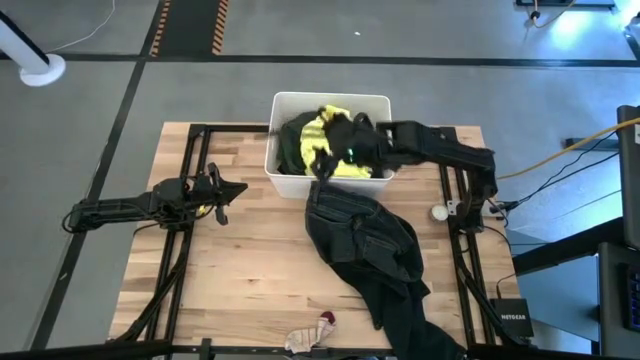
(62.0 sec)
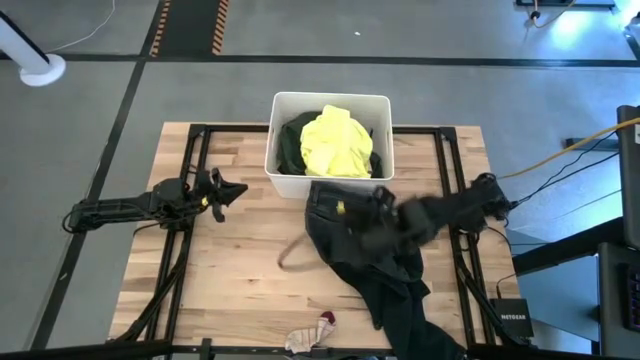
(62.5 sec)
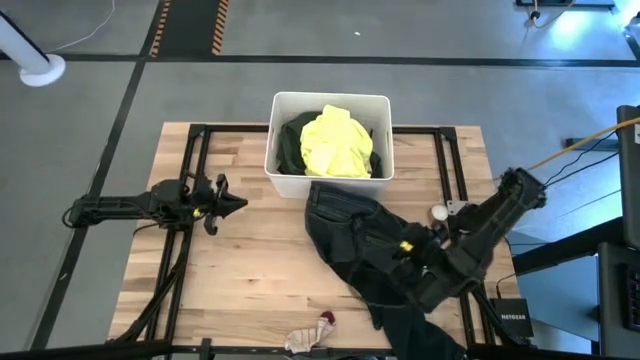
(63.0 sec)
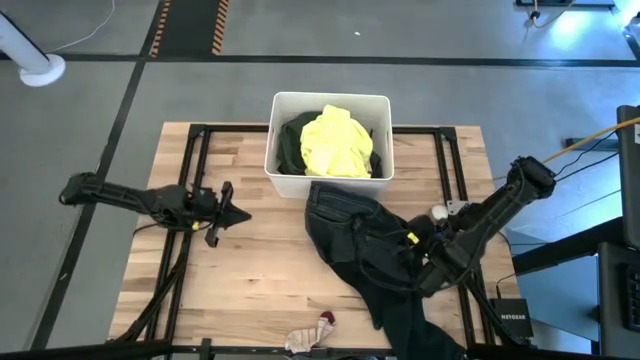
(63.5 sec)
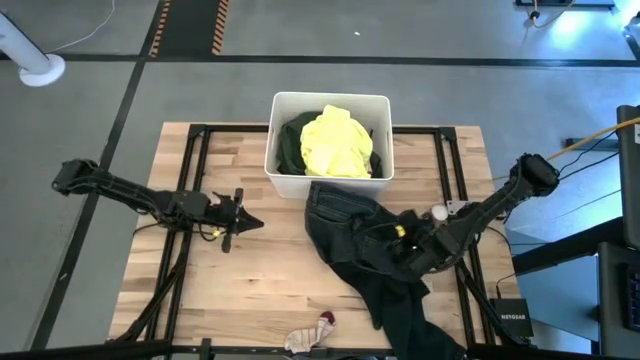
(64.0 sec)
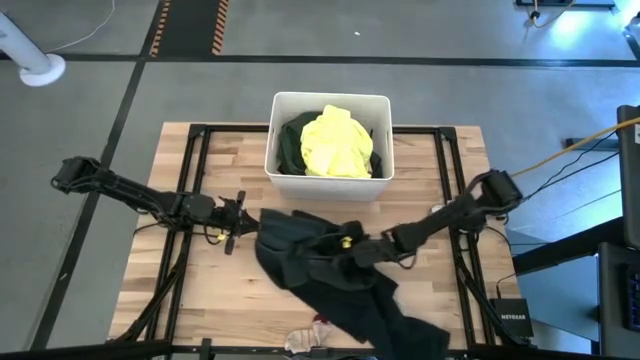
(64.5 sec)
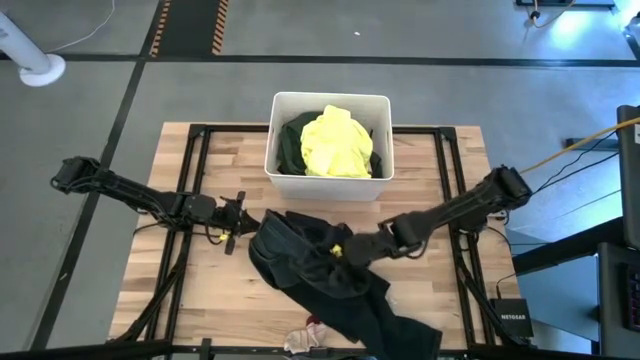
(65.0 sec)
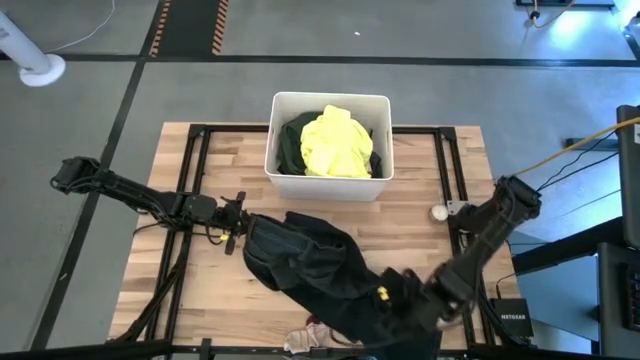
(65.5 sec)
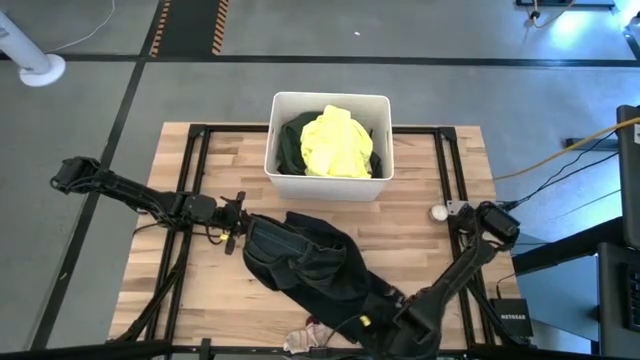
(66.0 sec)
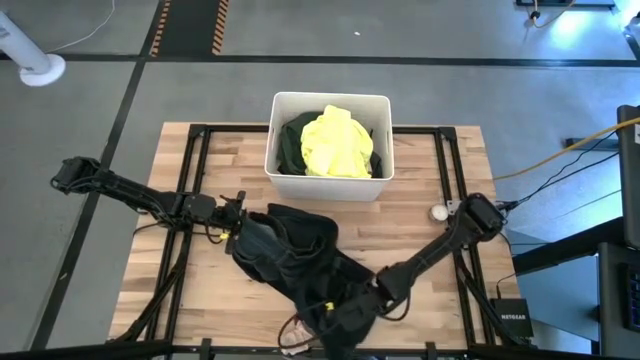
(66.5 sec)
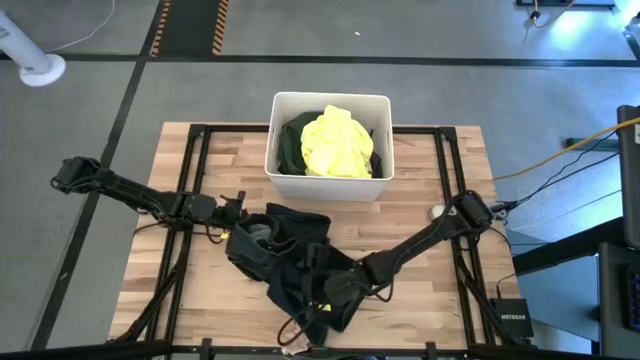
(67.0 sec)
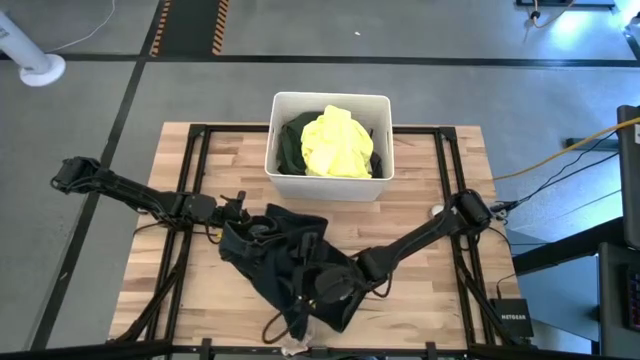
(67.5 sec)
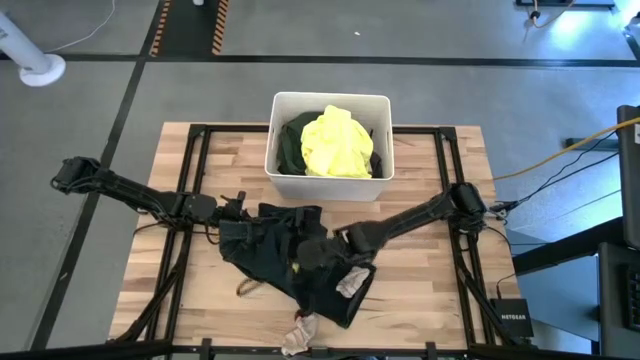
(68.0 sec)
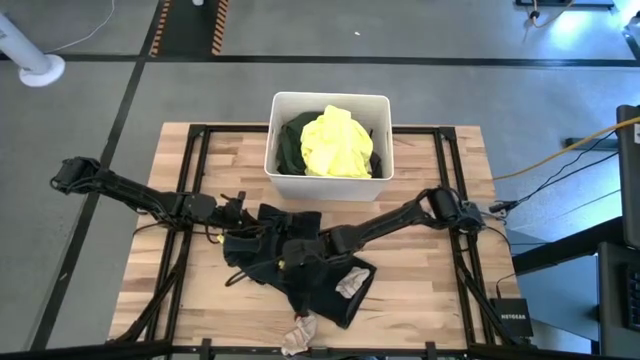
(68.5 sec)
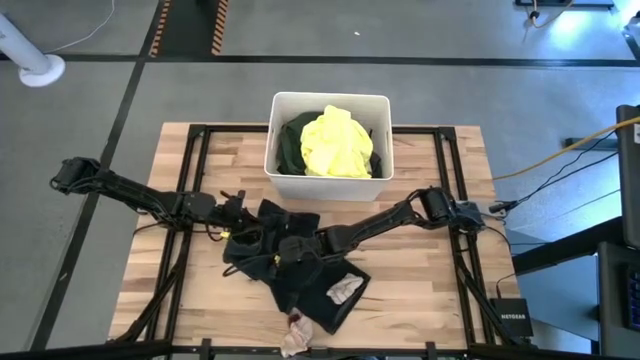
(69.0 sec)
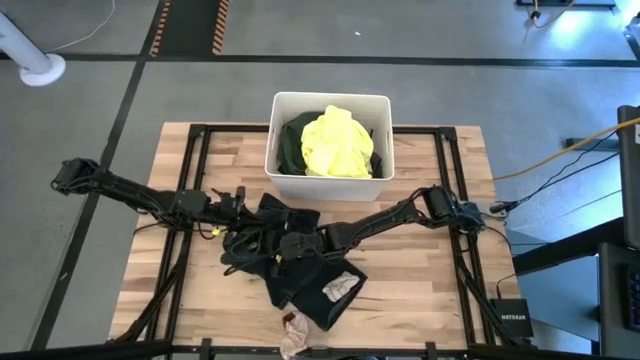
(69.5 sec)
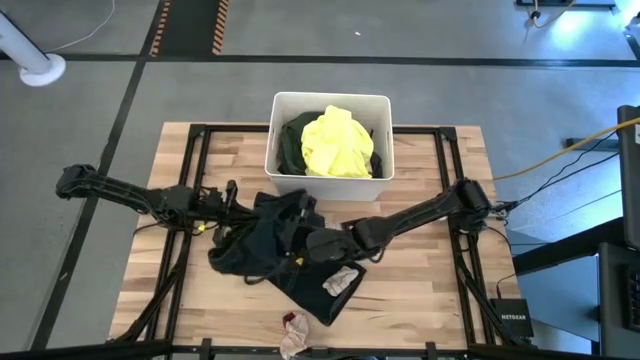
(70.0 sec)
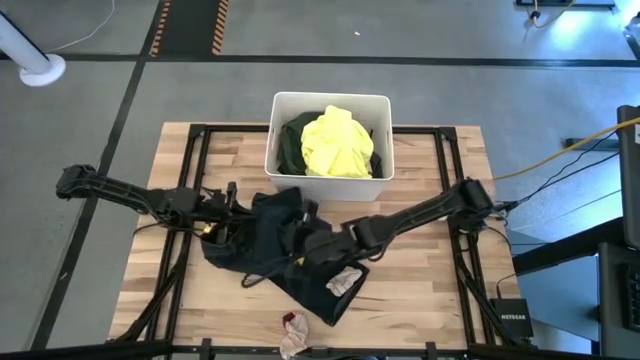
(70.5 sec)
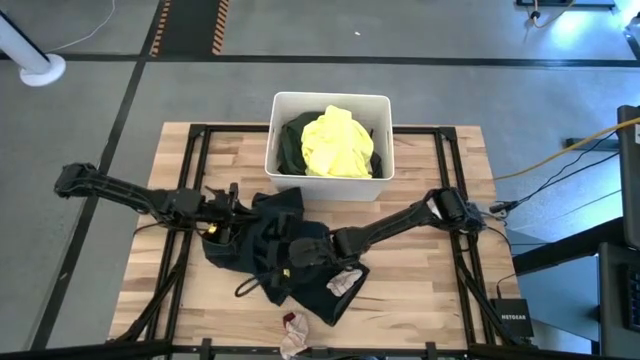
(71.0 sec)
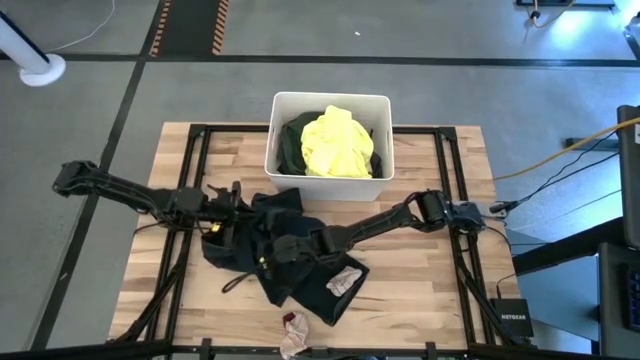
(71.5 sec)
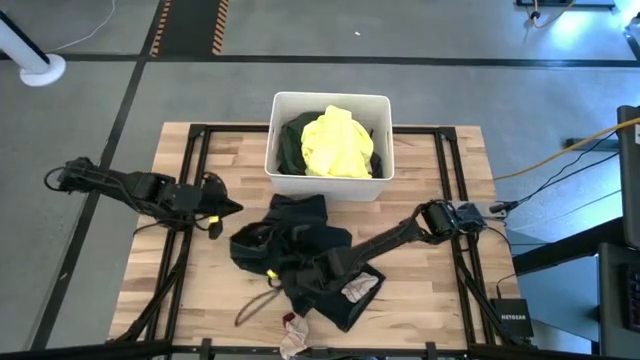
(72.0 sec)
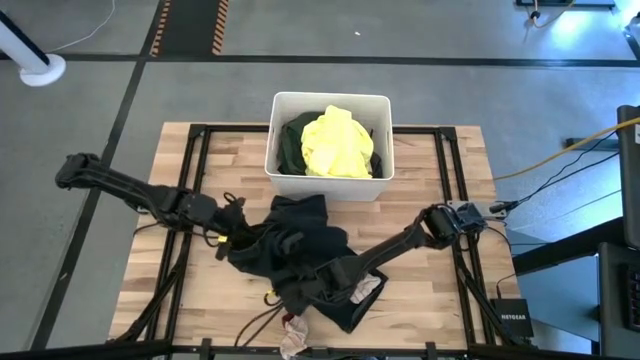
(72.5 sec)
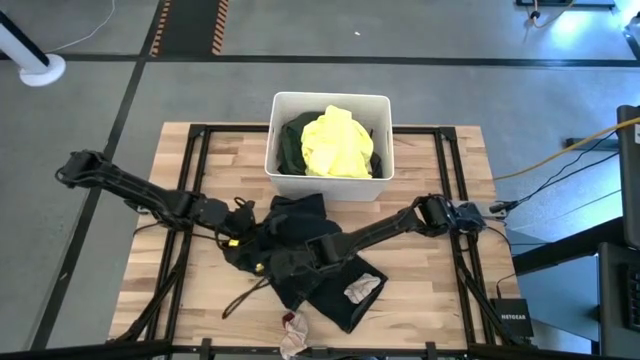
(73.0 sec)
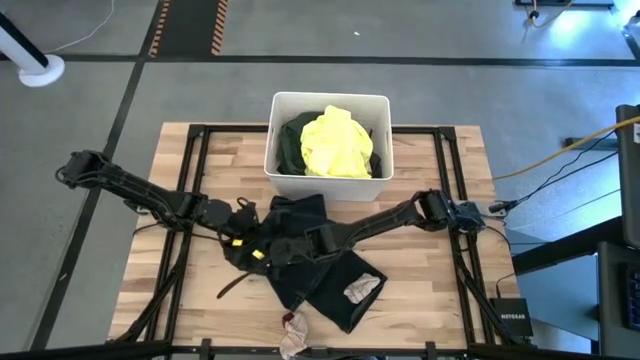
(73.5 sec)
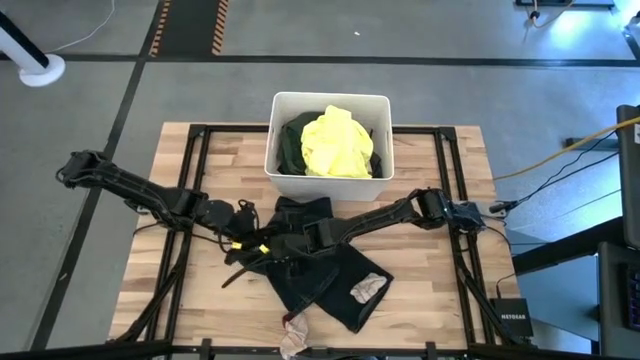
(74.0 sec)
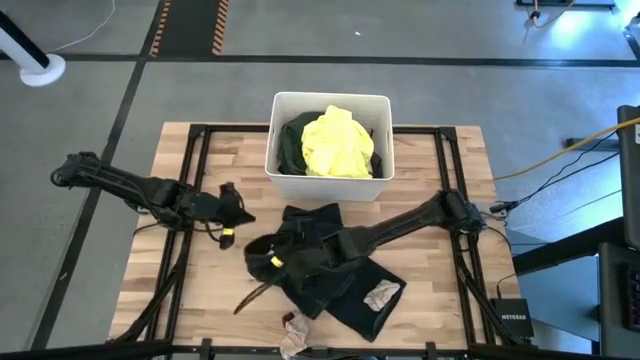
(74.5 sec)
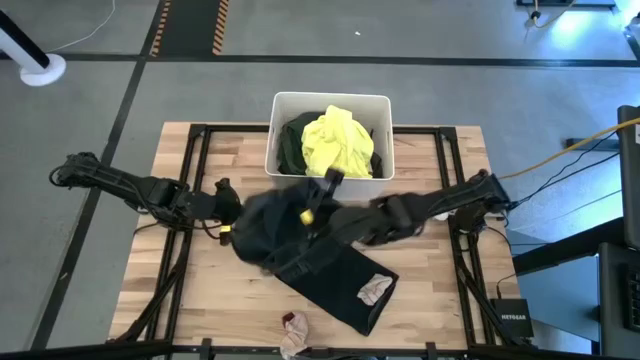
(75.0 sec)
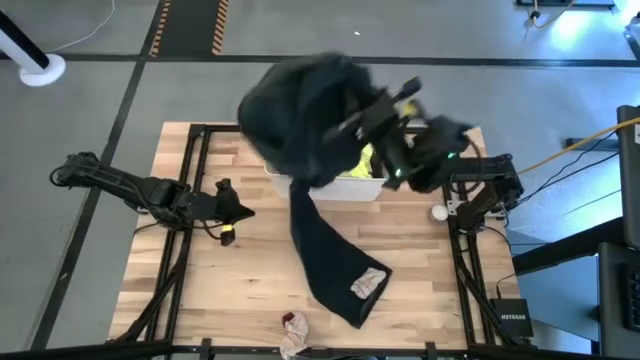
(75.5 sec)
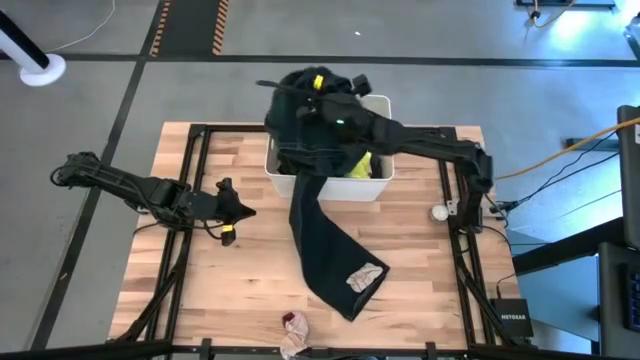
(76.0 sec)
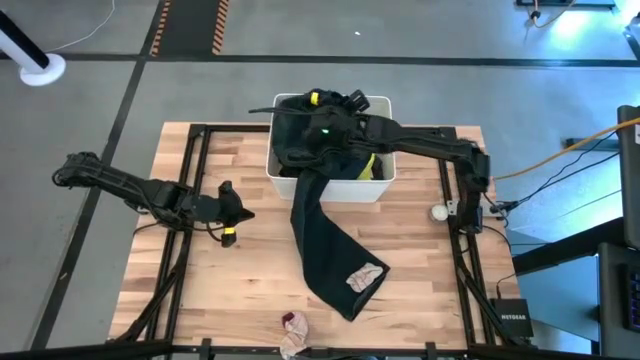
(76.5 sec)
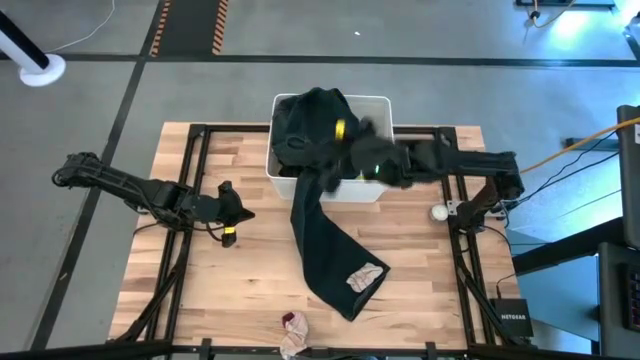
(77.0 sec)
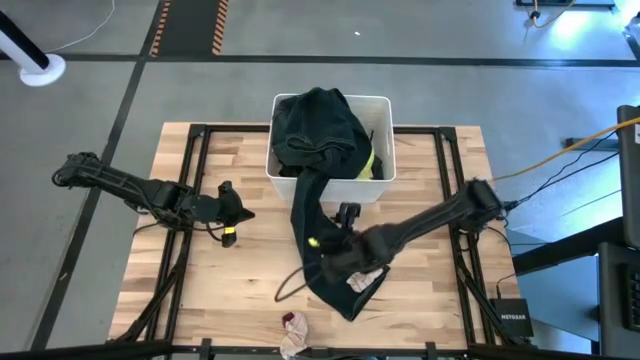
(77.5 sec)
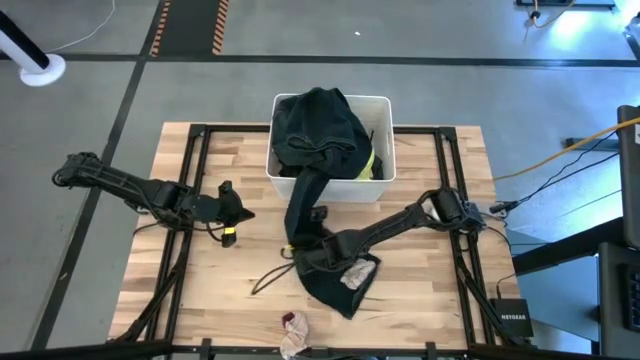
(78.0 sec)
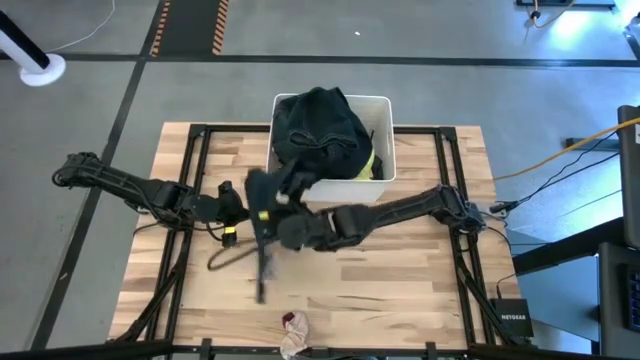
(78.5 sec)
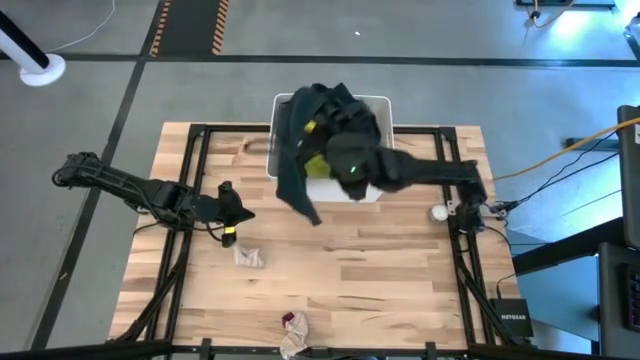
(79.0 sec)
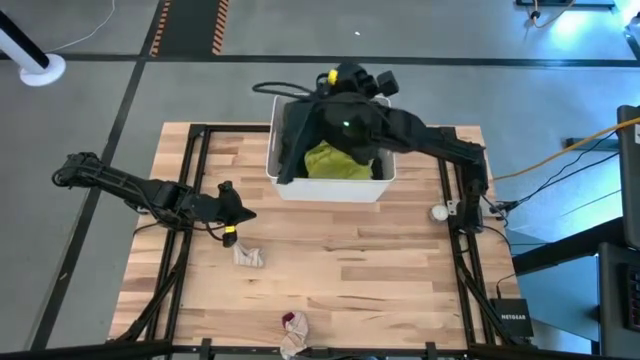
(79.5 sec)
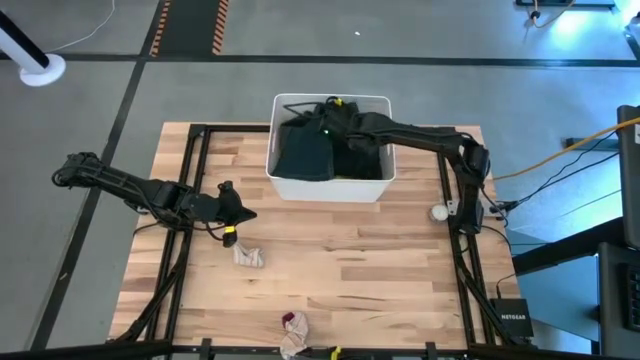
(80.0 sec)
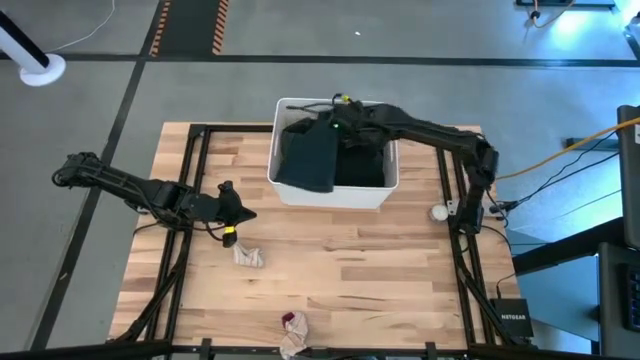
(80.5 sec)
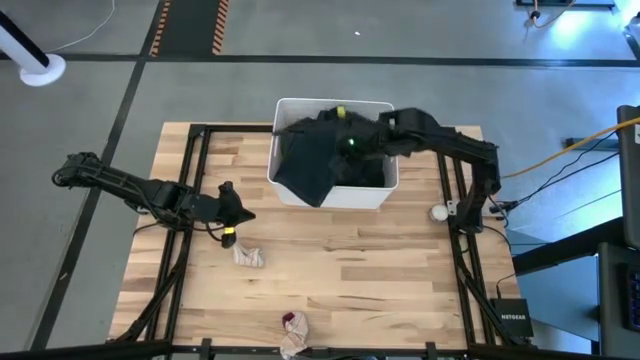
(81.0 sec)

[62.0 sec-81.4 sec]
Task: Sort clothes
Put the blue pants into the white laundry organizer

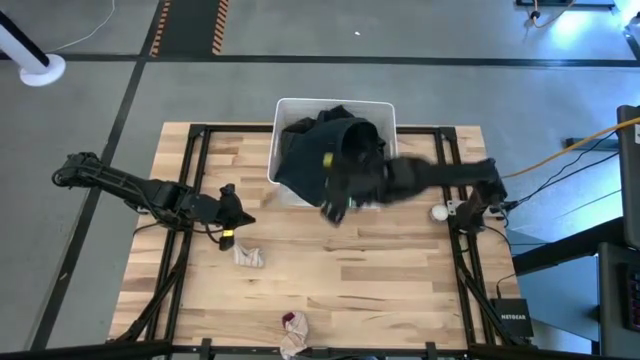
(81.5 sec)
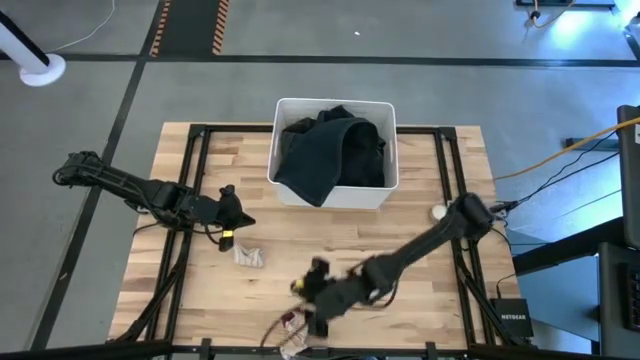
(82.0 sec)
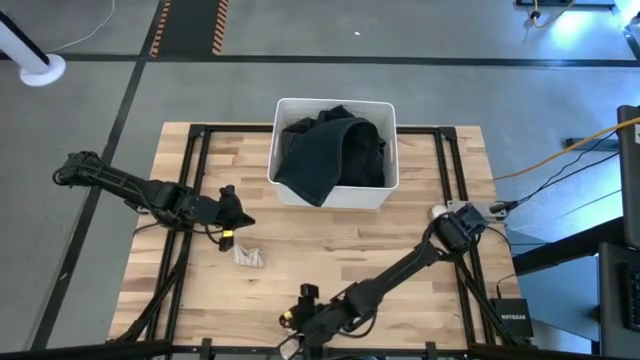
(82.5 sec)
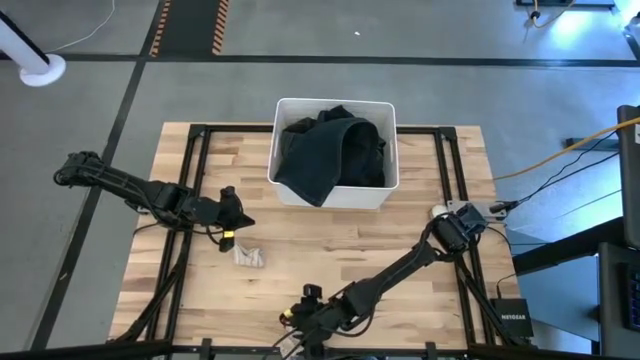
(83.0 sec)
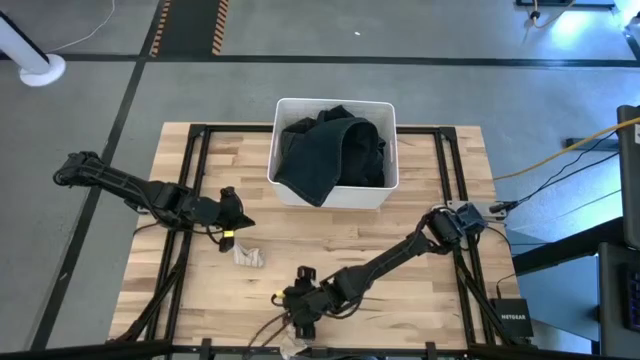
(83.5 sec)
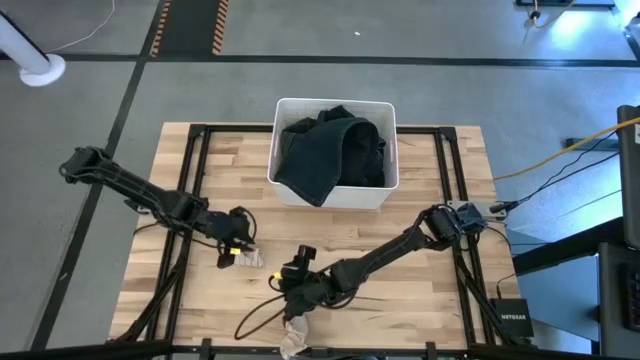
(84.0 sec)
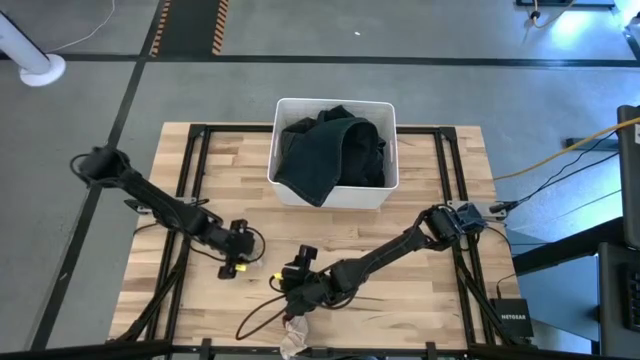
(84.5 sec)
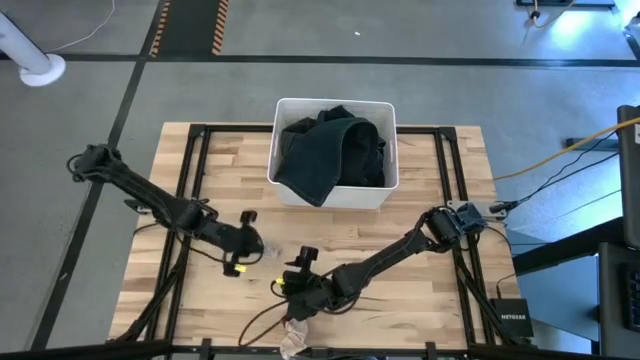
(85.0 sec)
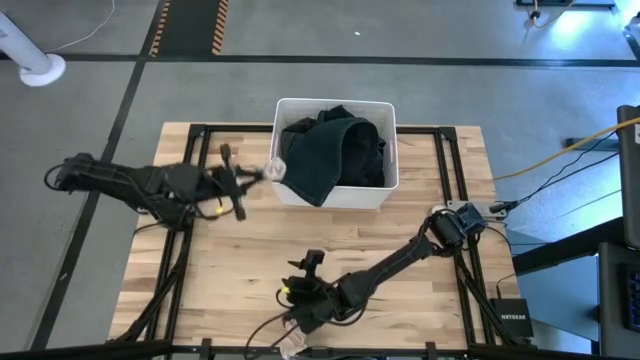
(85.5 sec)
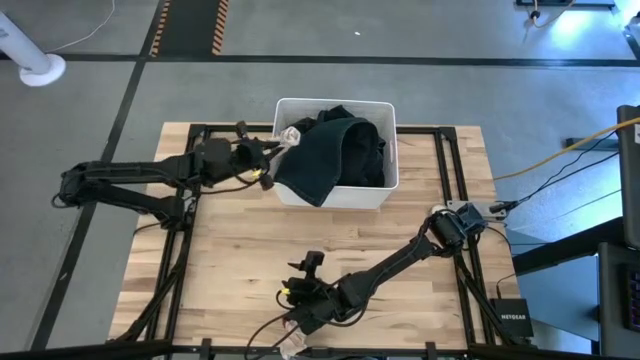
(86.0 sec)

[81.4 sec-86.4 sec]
Put the top red sock into the white laundry organizer
